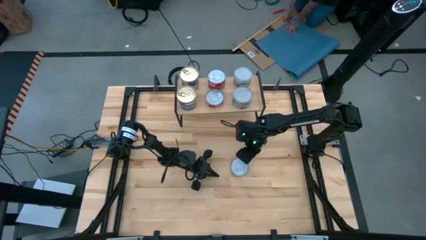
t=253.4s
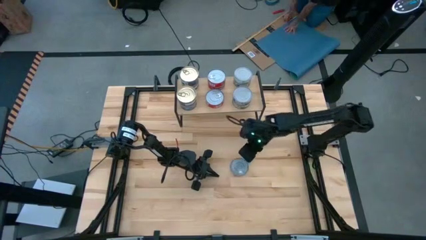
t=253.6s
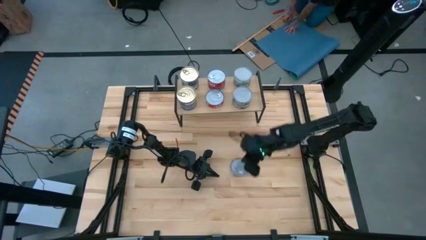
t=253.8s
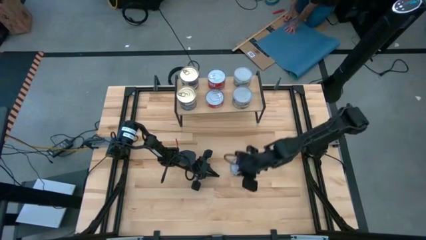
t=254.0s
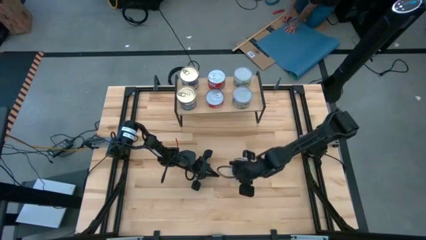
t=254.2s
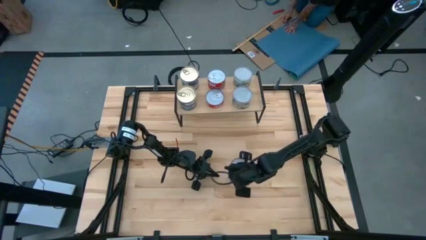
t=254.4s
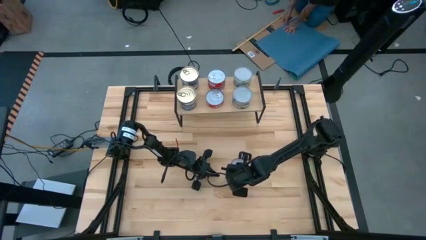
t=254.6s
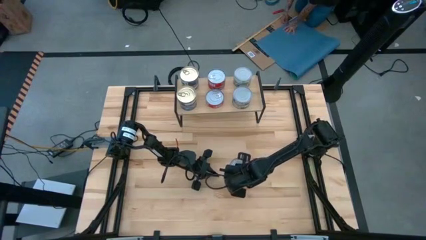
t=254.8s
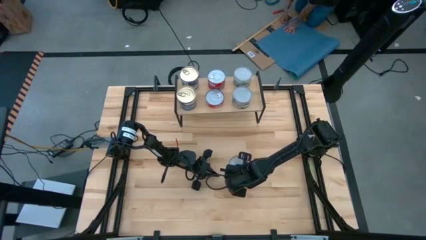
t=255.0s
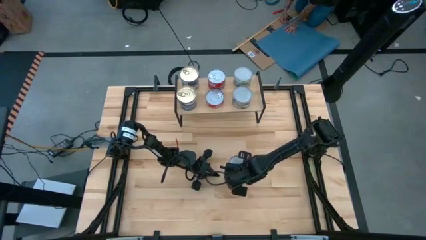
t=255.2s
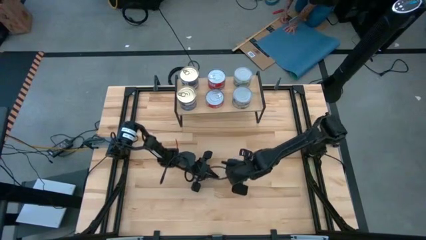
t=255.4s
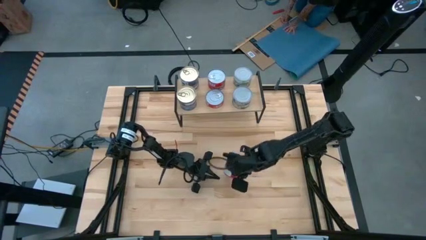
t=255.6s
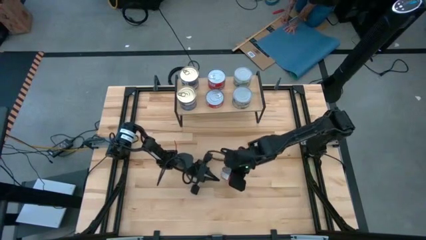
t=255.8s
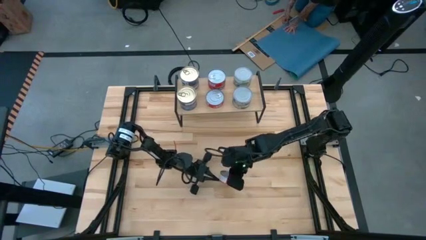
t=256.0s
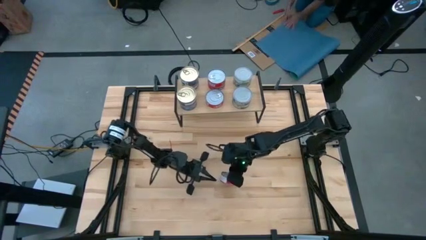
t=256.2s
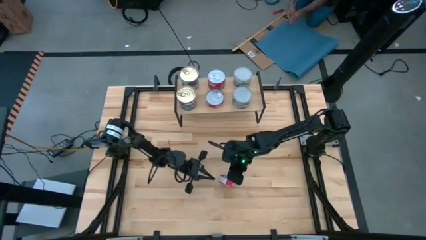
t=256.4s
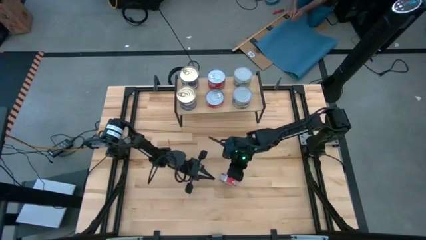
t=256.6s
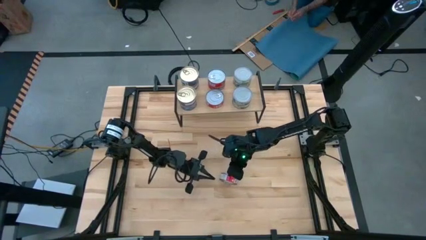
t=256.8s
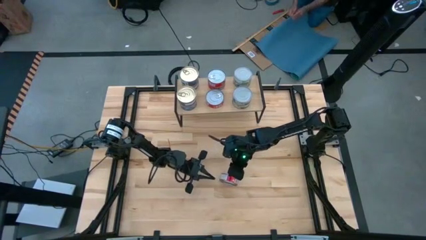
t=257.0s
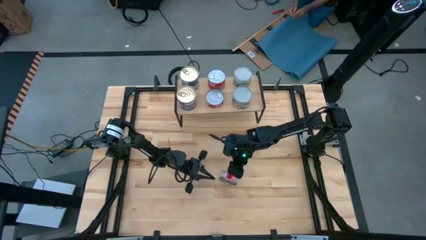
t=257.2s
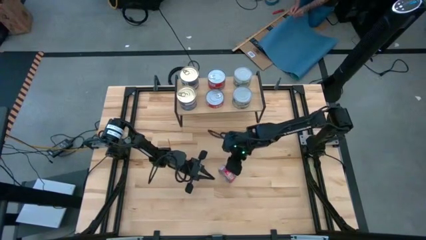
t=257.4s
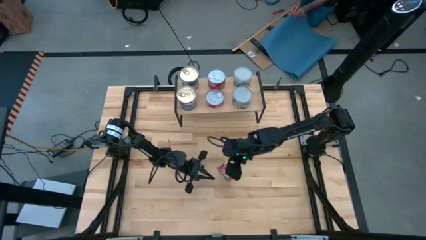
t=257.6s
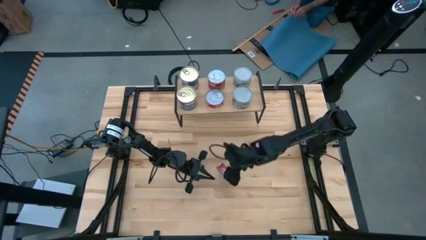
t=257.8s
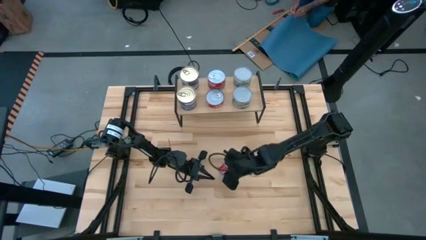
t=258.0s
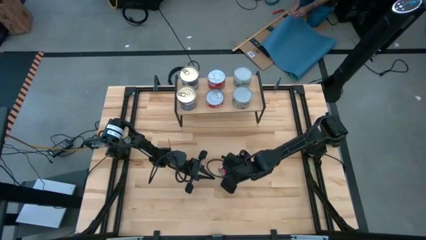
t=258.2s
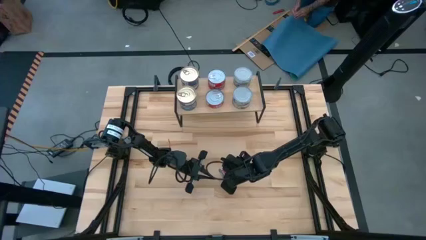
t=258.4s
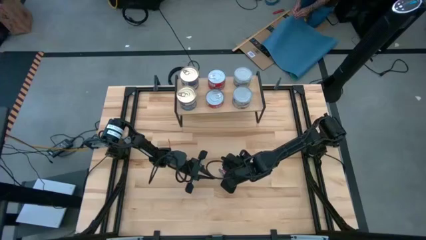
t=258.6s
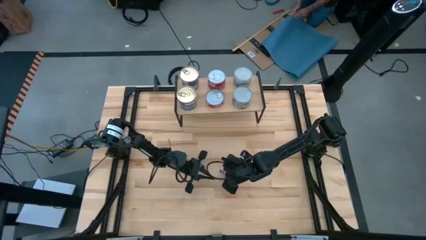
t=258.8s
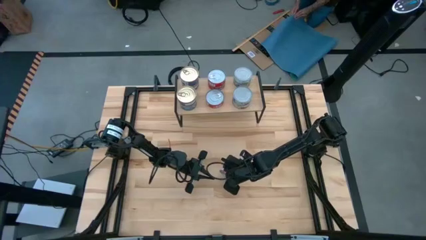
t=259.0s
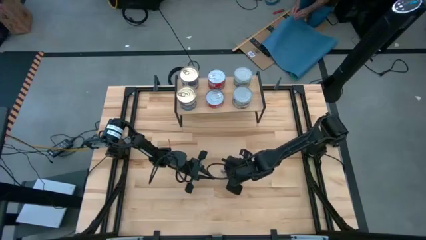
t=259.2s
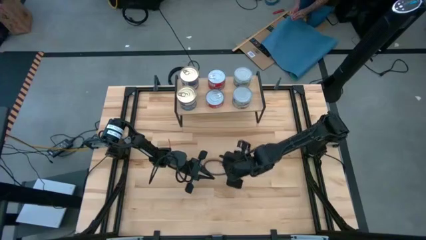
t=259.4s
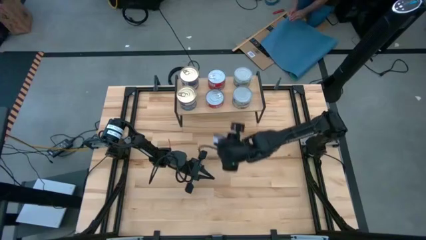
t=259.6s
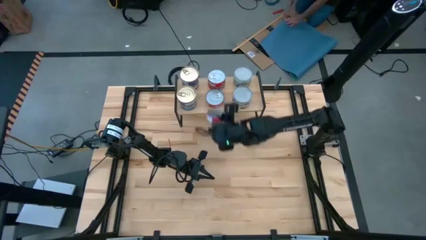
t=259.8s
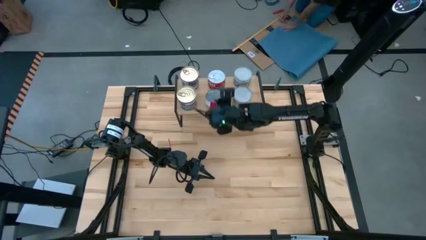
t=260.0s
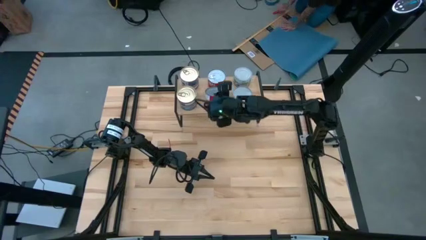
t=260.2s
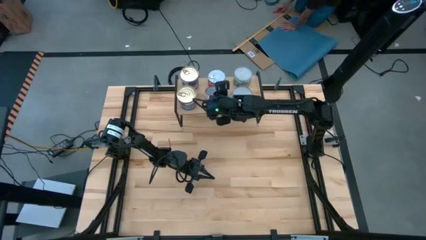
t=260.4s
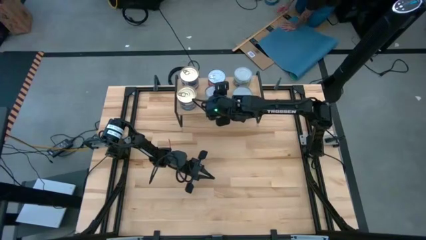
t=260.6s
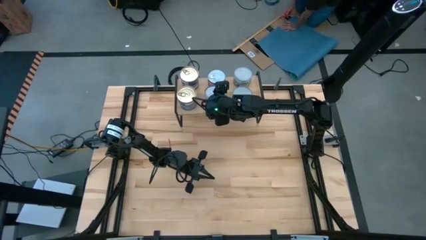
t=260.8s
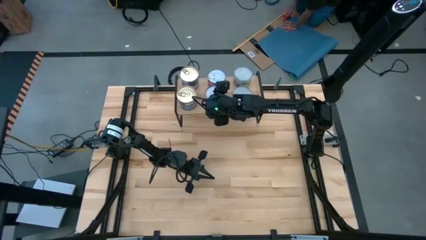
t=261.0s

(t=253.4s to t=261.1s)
Task: Stack canned seafood by type on shelf
Stack the red tuna on top of the other red tuna can on the shelf

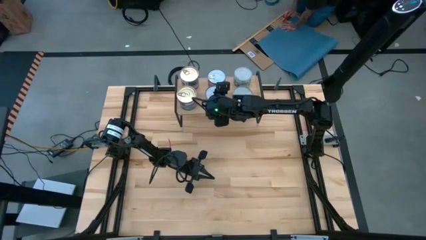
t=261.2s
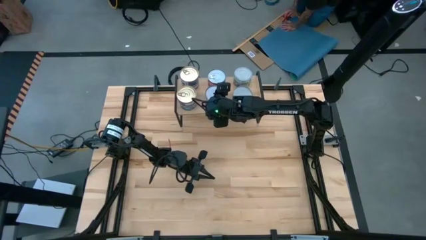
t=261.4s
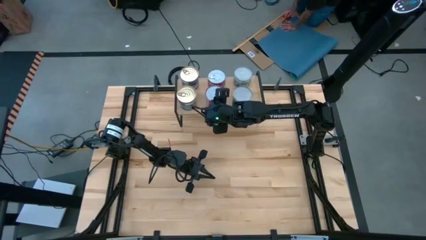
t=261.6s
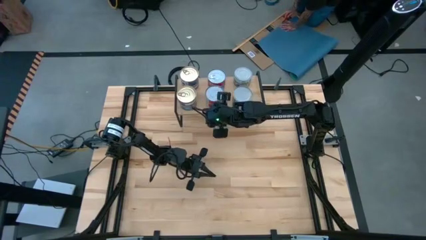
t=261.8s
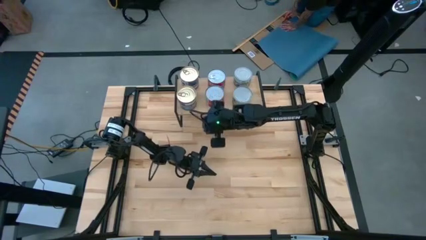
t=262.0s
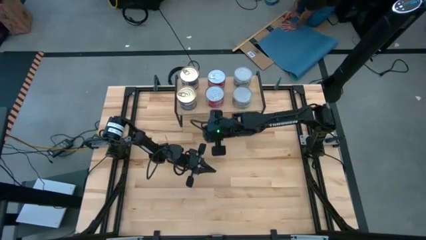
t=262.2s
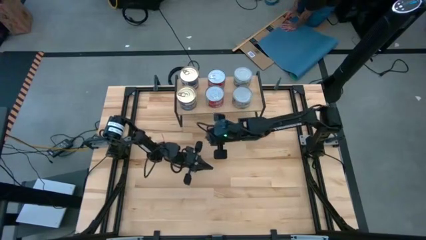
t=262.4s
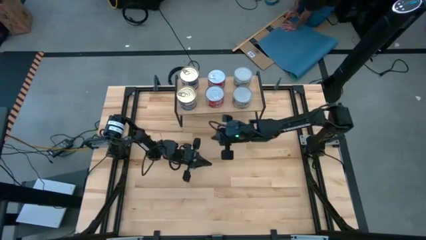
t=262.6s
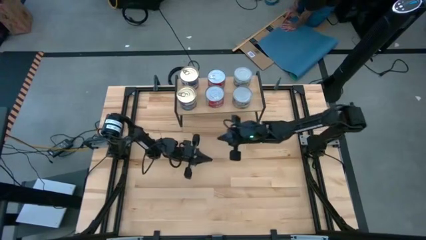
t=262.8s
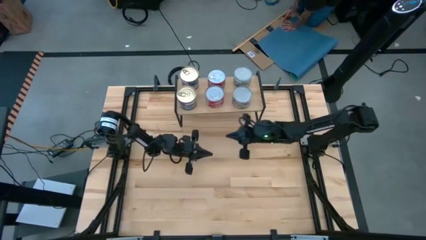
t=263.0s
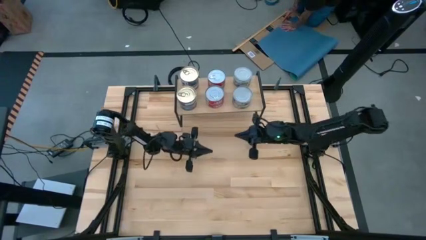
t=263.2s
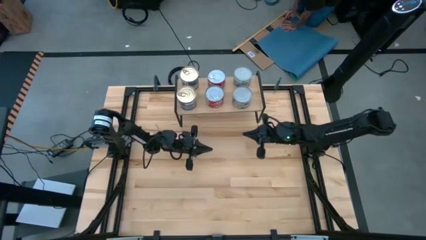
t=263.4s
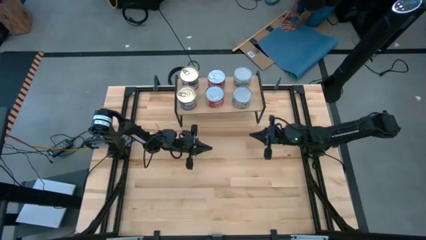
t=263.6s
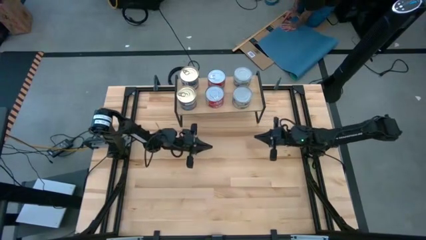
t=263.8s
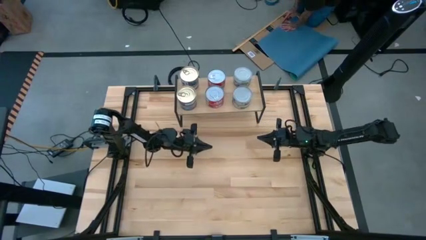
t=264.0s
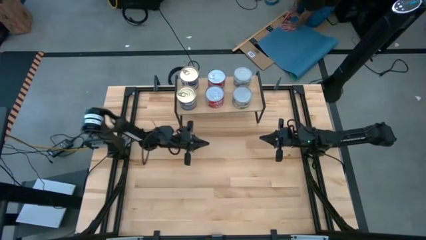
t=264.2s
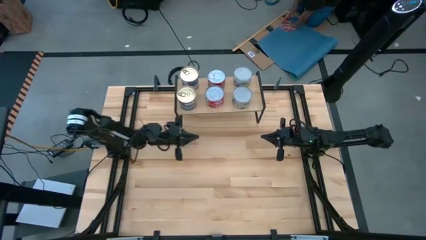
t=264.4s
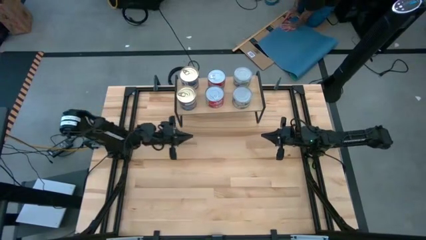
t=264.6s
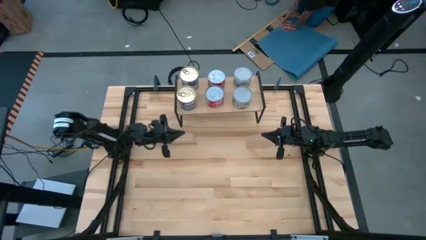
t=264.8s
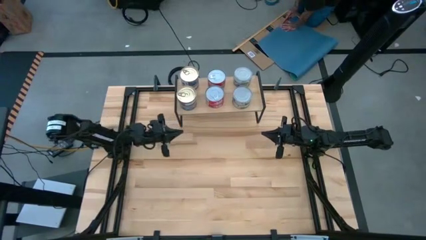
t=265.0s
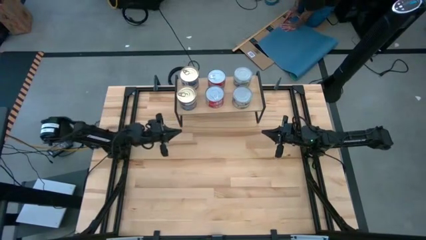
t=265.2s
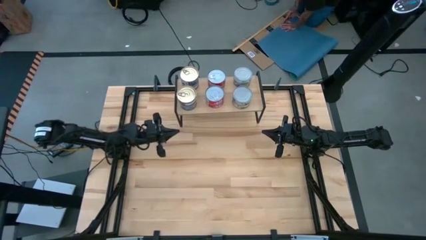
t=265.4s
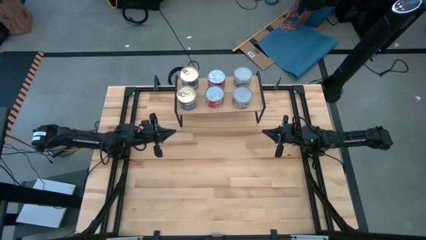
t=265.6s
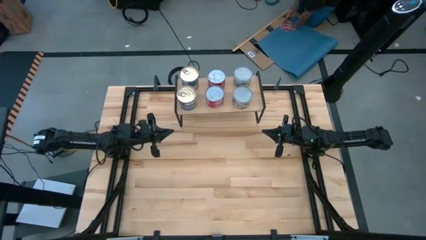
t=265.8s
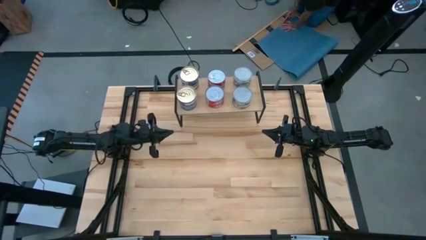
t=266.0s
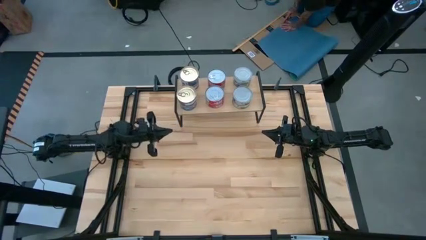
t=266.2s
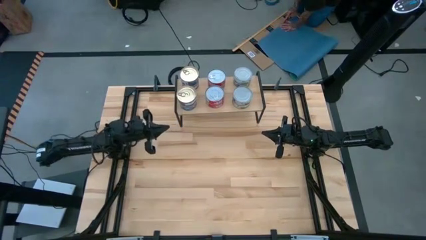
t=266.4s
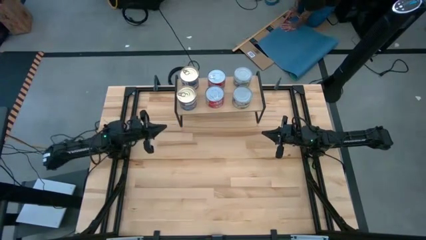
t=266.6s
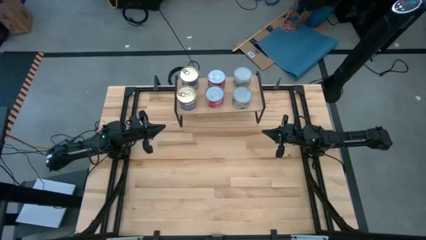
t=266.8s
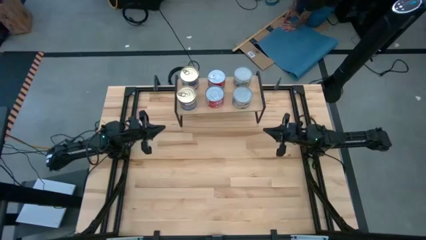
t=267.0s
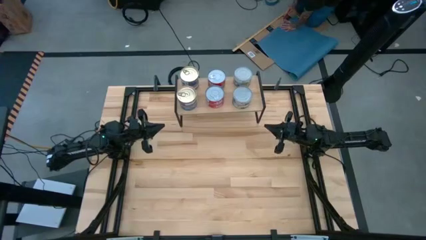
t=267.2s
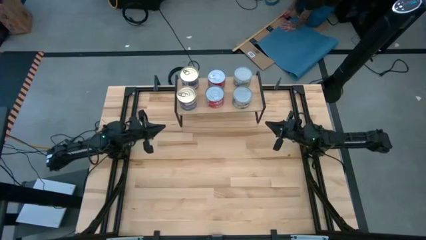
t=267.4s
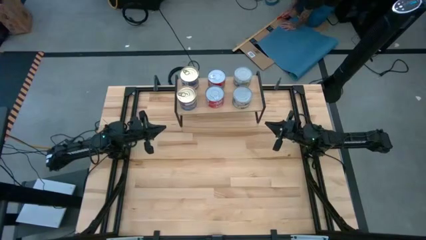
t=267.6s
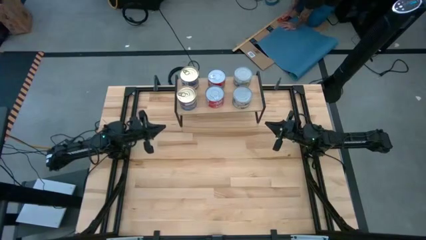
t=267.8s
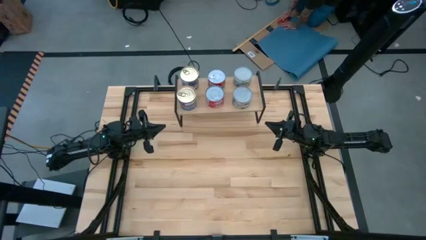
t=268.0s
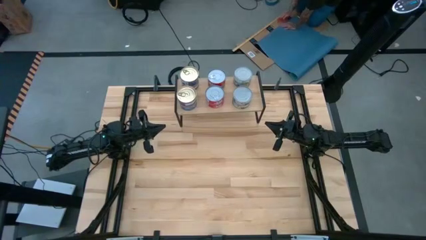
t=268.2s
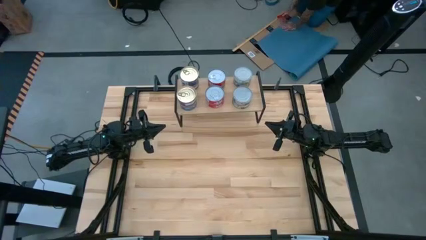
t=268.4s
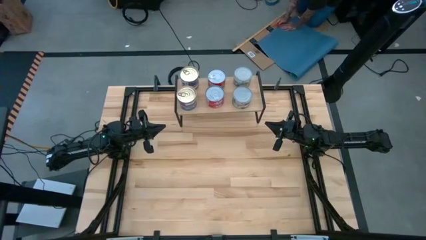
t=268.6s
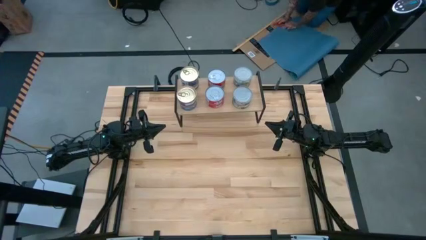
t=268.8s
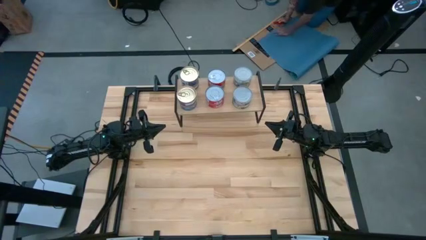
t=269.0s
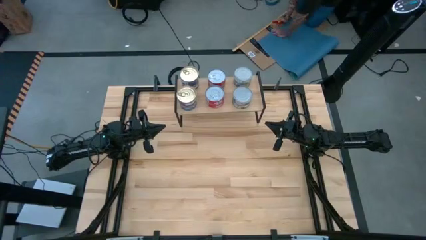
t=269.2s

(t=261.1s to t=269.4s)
Return to Home Position

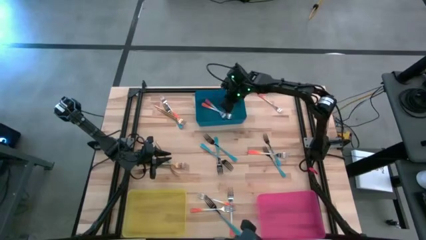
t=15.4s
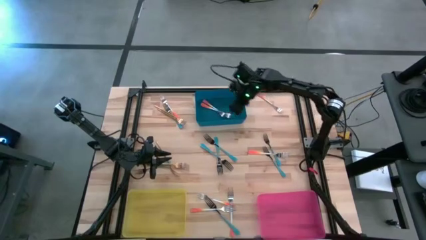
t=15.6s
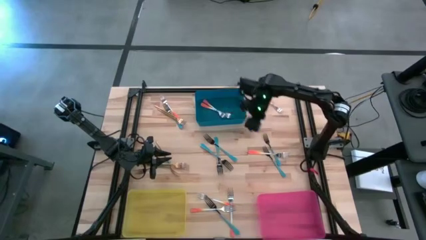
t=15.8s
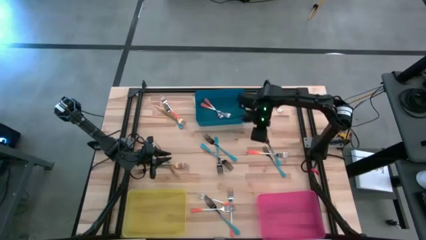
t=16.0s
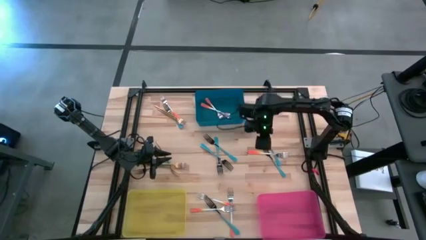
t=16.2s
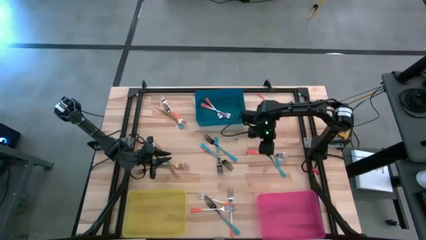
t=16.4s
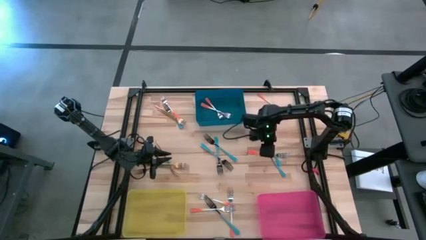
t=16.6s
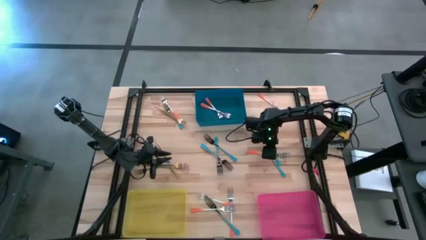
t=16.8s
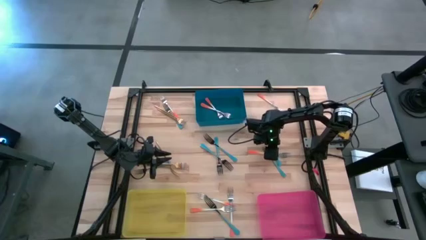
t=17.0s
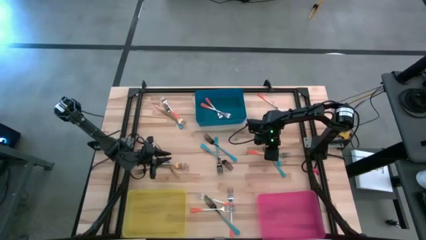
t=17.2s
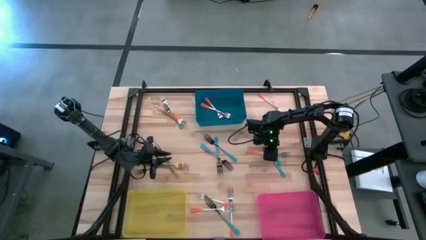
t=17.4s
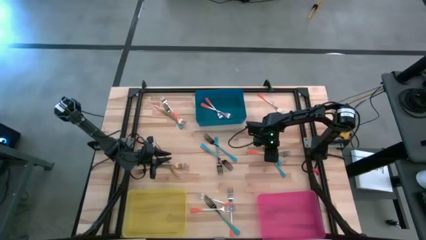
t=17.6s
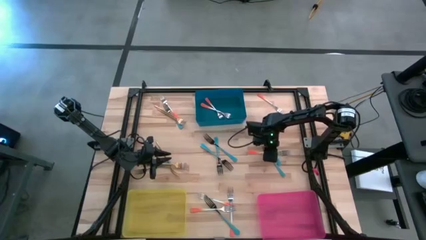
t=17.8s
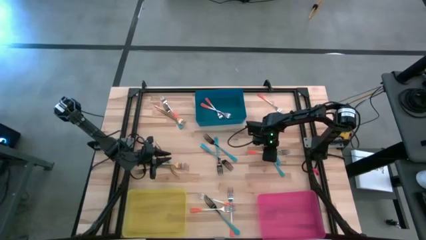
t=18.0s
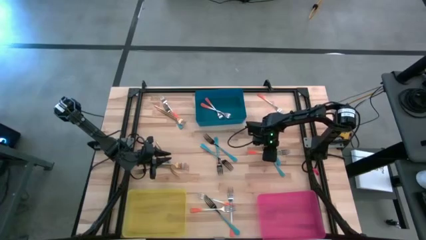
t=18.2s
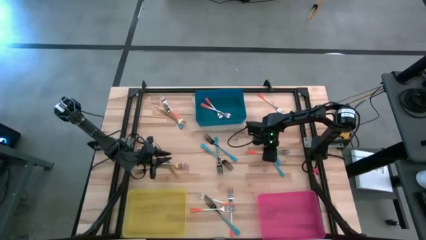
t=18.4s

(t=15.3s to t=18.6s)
Task: Sort silverware by color (type)
Put the orange fork into the blue bin
